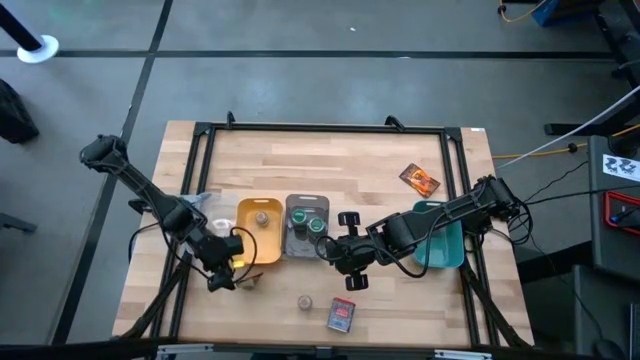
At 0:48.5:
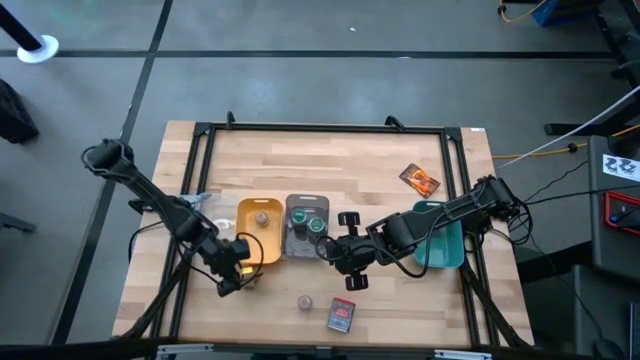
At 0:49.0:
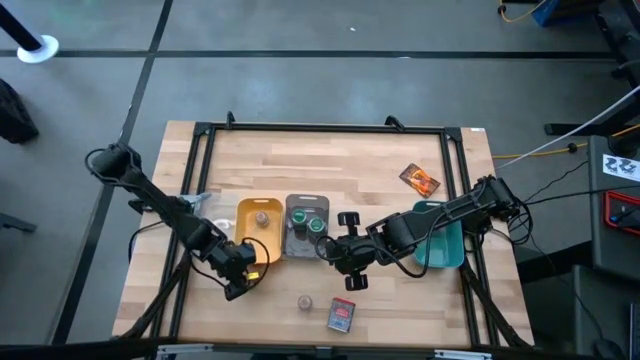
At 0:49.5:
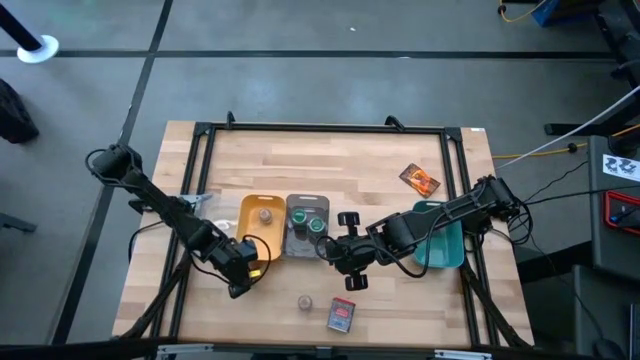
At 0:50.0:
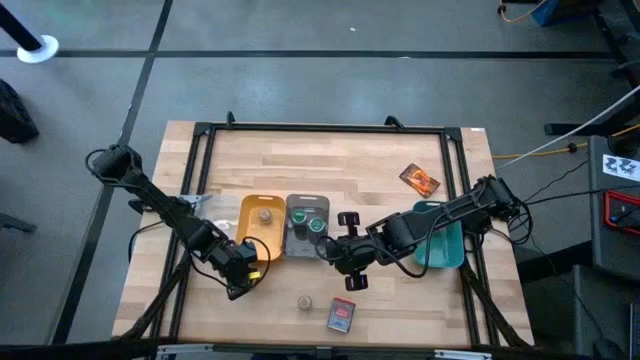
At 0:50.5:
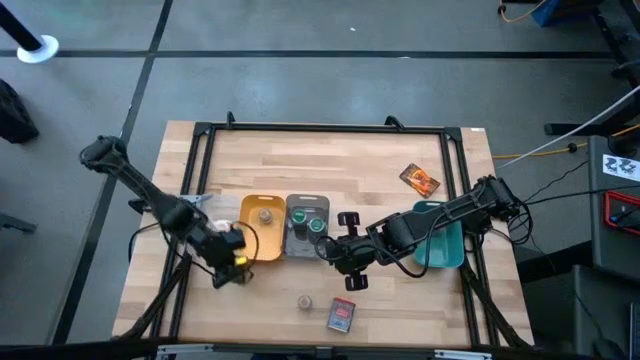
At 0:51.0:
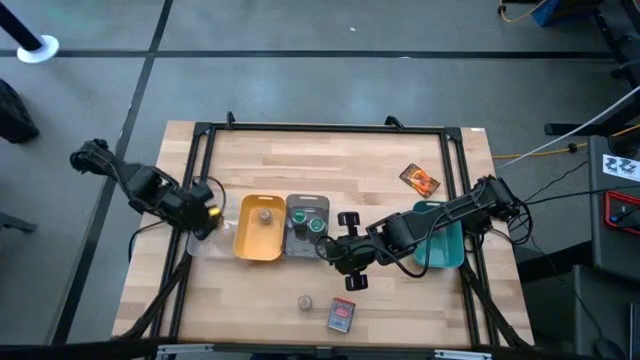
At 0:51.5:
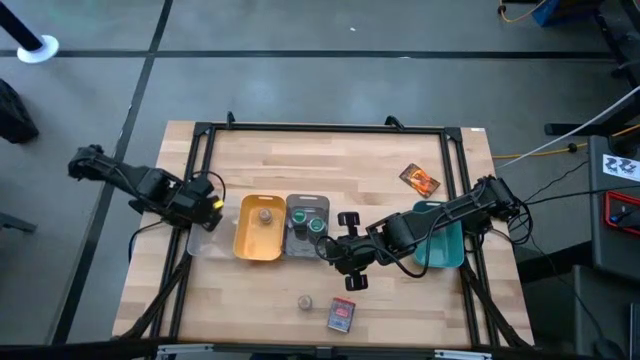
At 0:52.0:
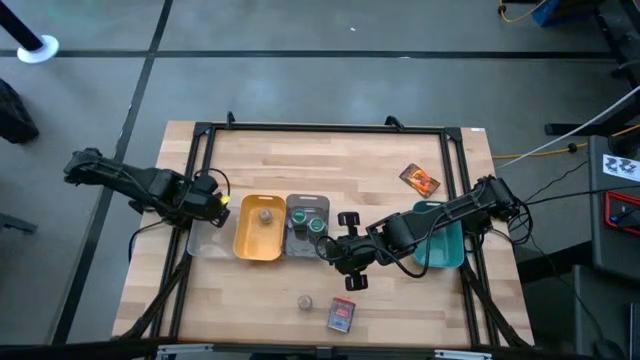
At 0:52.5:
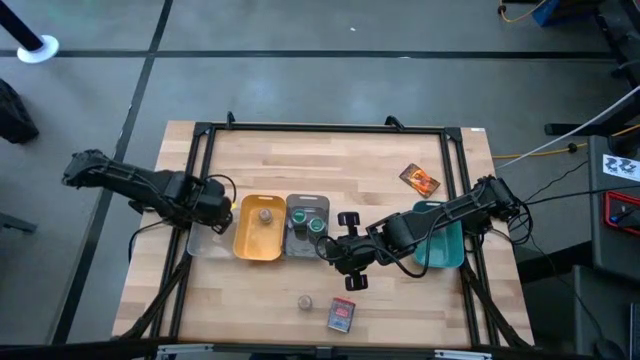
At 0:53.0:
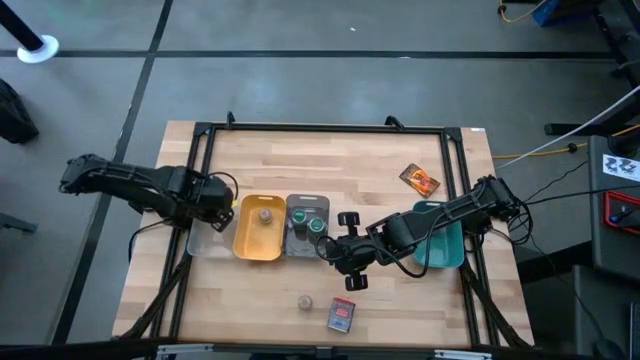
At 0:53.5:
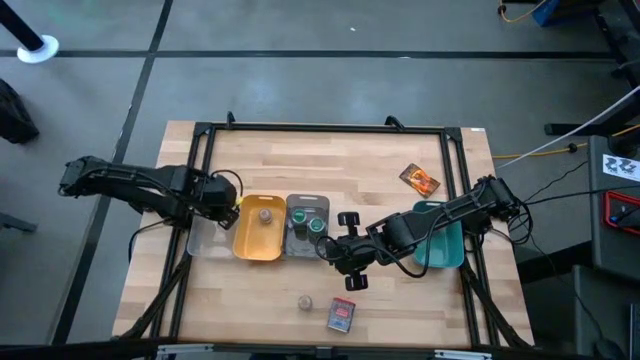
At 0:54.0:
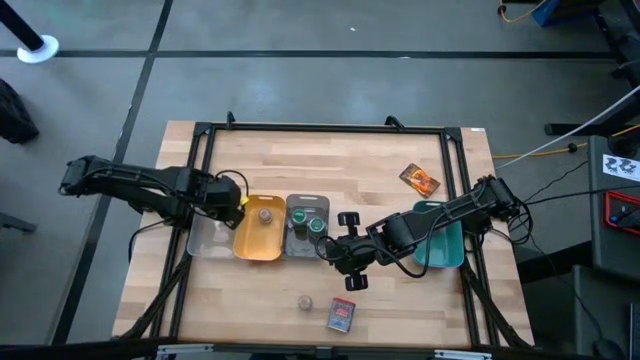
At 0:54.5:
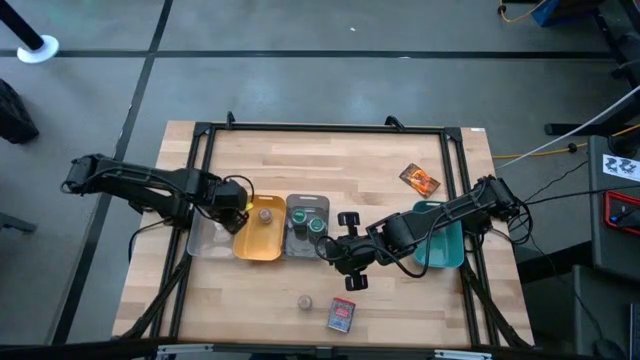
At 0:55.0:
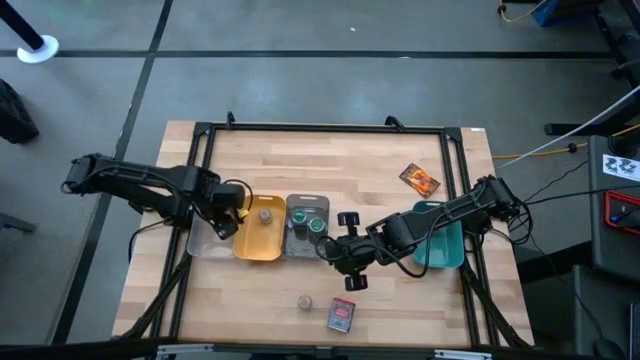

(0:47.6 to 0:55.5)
Task: Sort spices by type
Put the bottom orange spice bag into the transparent bin

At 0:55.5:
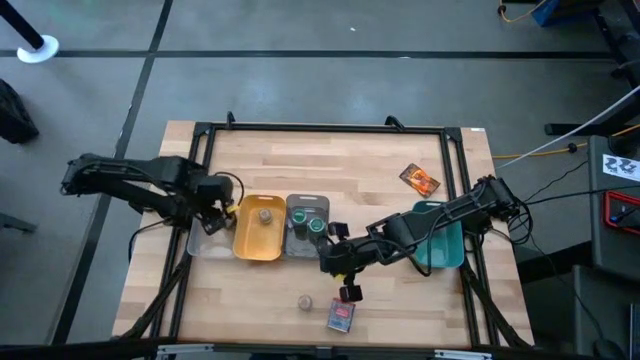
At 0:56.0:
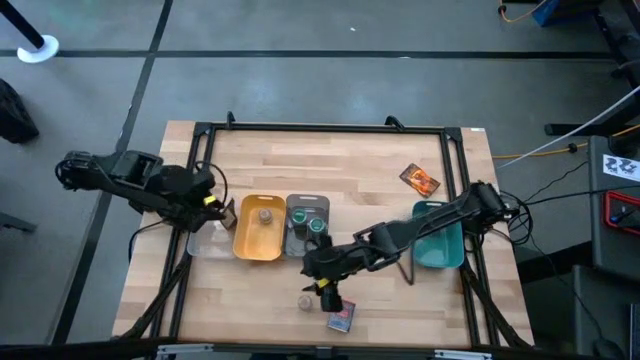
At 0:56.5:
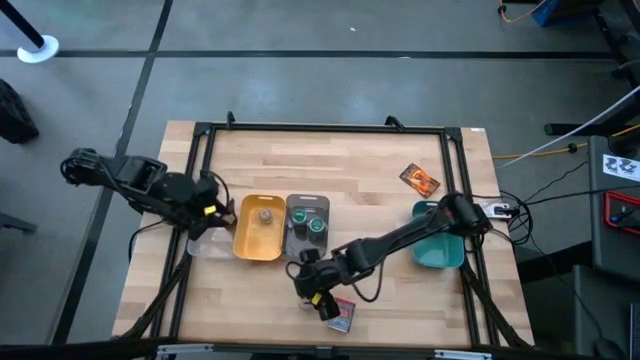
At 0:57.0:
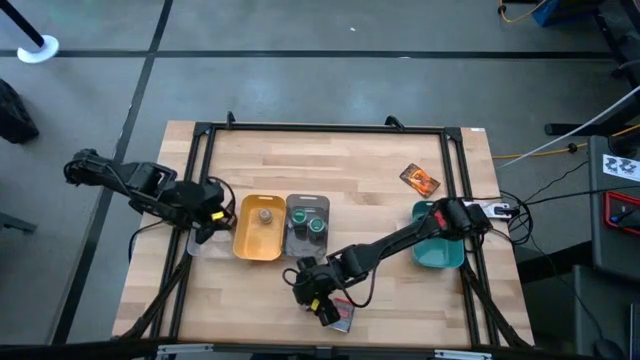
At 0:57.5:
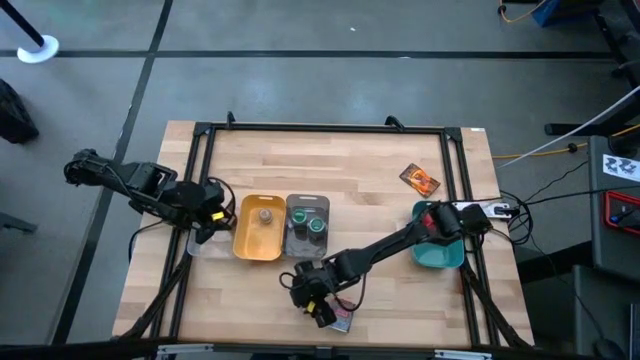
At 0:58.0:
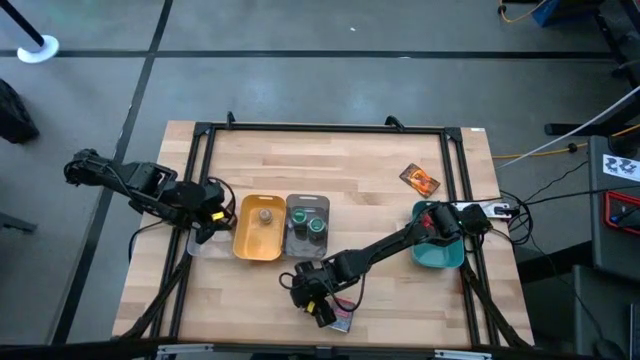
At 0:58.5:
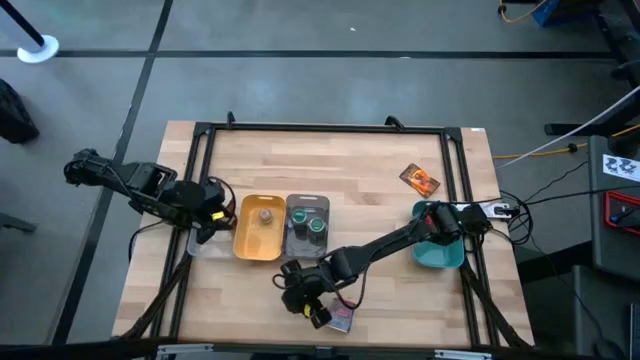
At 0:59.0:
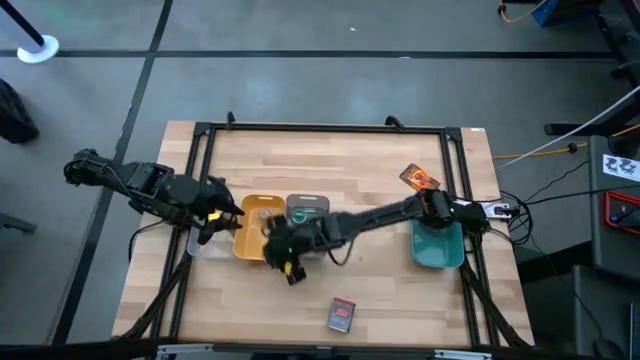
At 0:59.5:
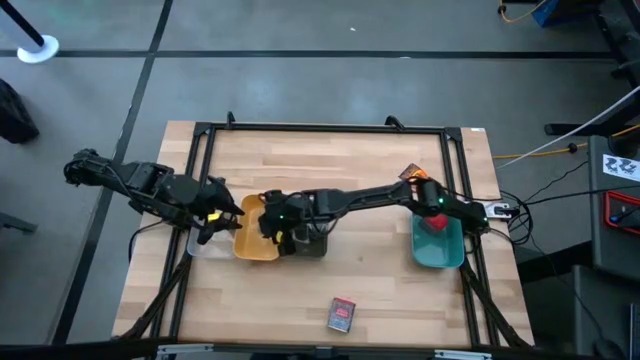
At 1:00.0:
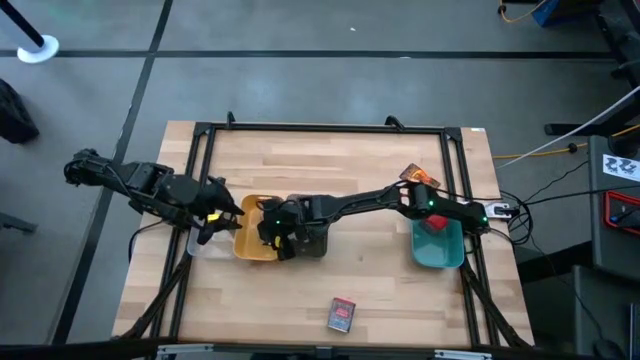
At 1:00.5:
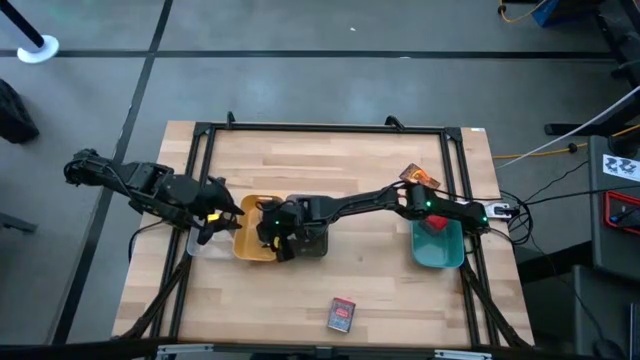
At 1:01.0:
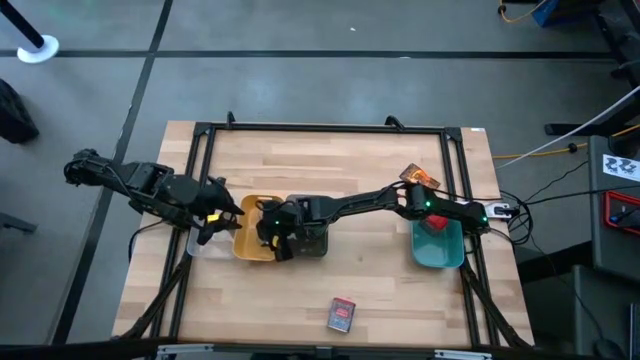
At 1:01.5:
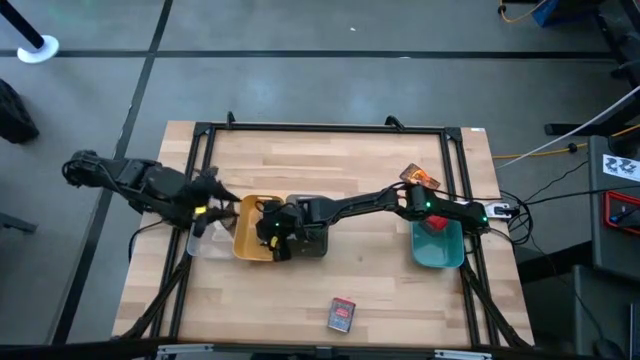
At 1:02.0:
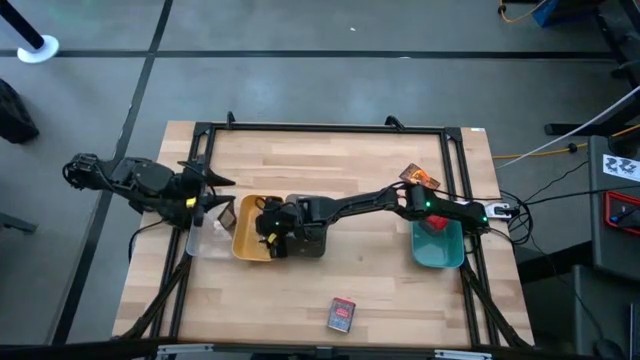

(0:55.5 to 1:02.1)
Put the brown spice bottle into the yellow bin

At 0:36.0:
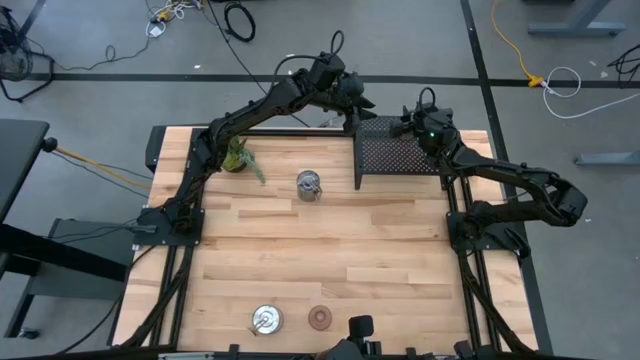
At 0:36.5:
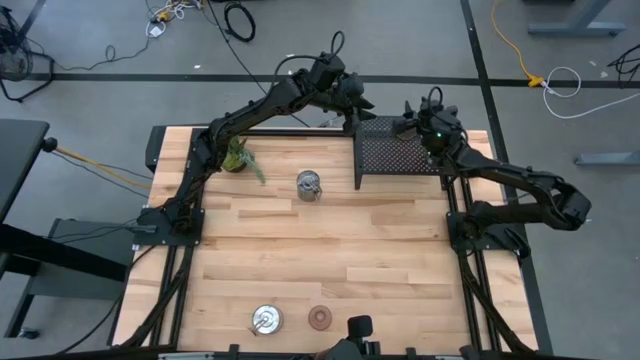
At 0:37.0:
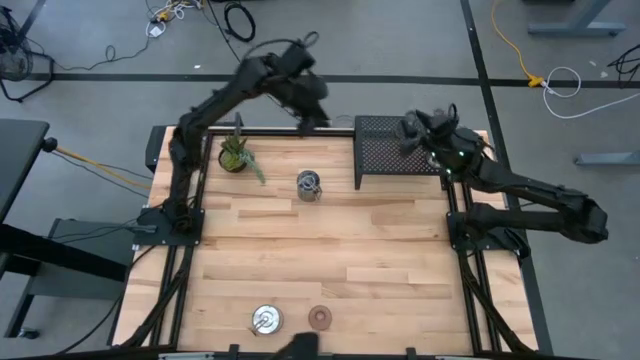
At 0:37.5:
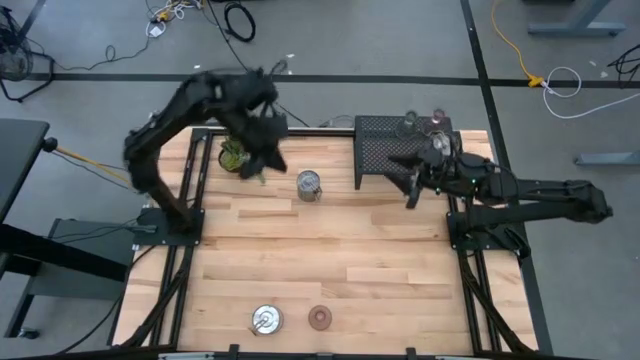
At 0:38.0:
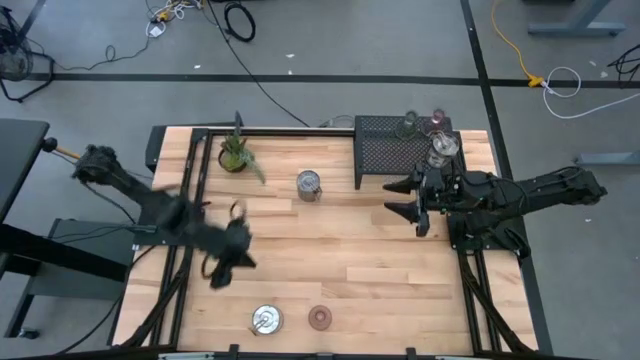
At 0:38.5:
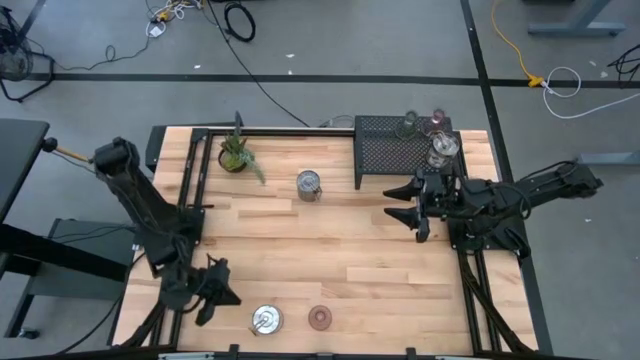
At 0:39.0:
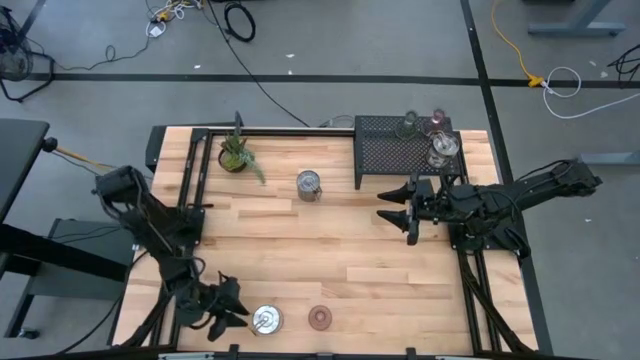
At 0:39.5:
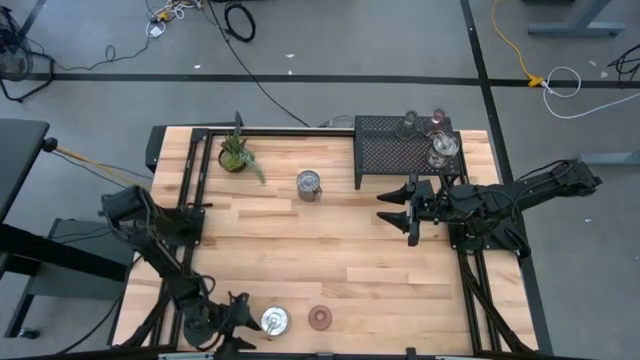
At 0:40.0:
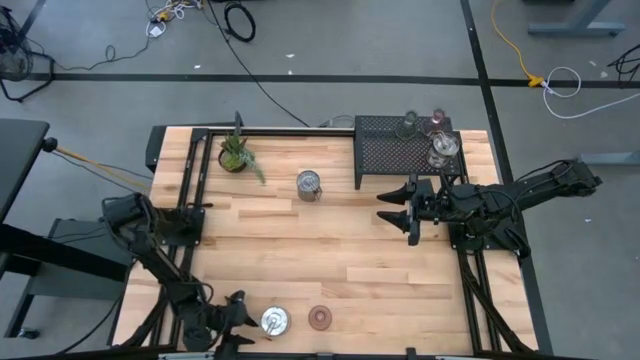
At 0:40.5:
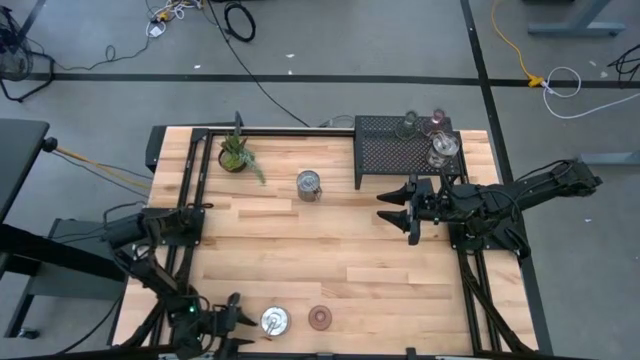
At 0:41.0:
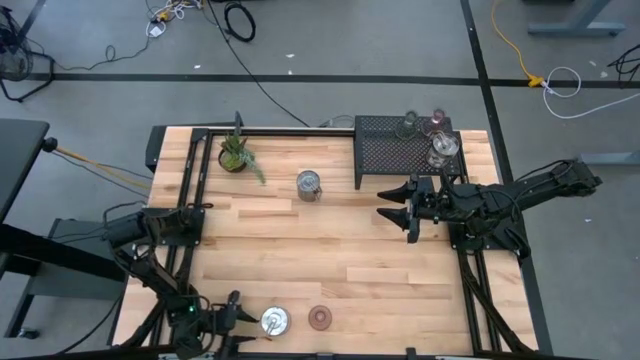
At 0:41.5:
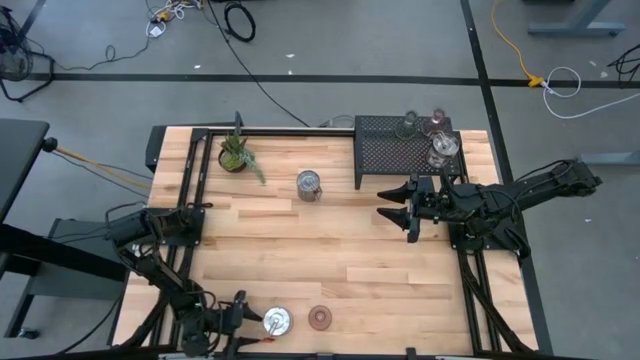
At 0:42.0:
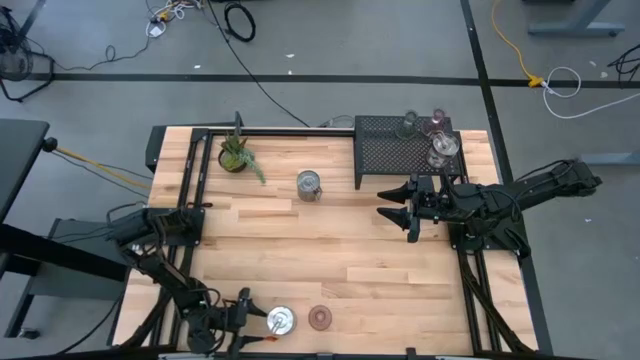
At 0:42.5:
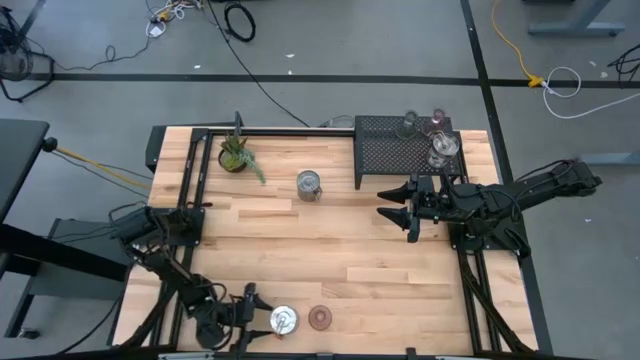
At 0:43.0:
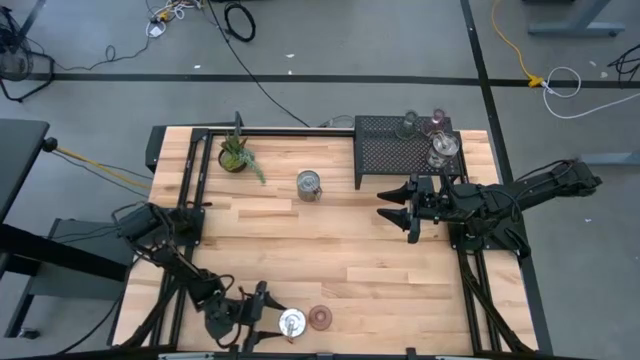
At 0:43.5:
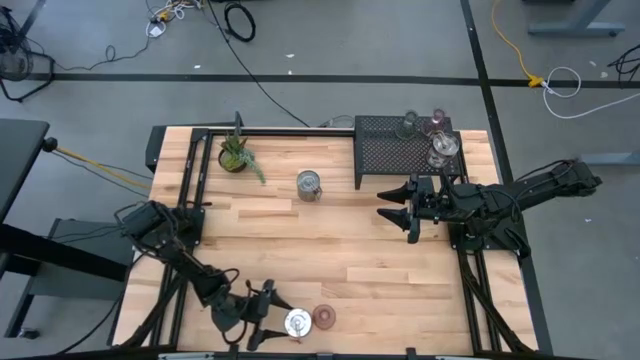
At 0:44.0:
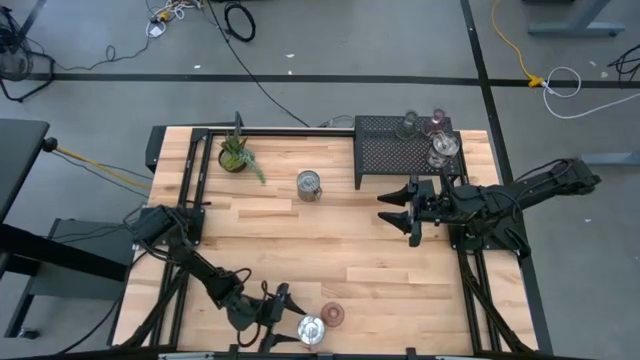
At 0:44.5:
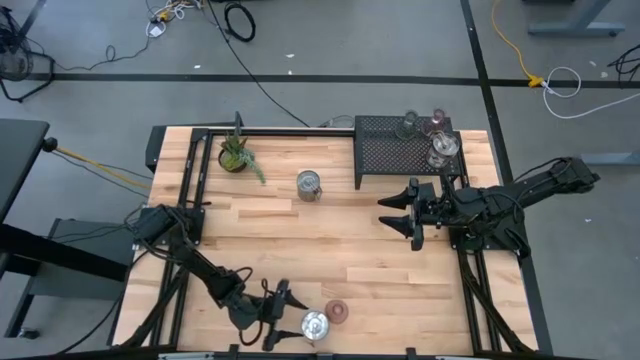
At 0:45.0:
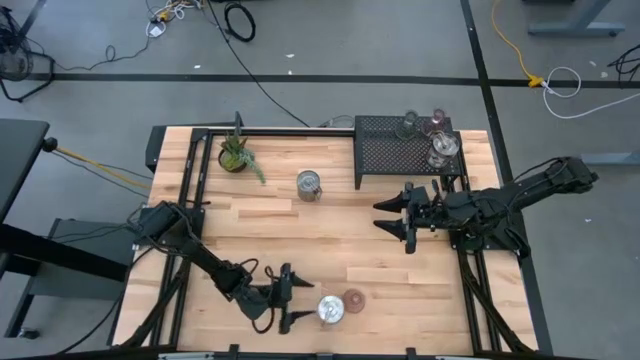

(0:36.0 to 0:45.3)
Task: Pick & Place candle stick holders
Put the orange scented candle on the shelf
